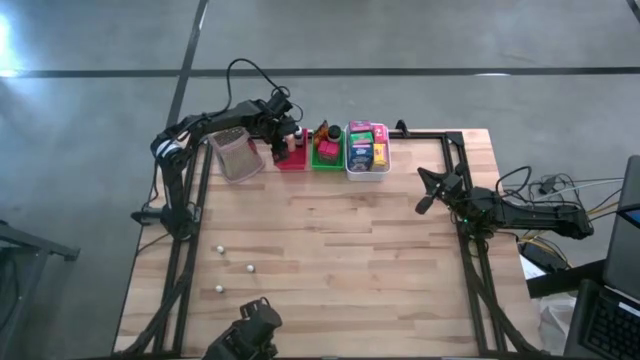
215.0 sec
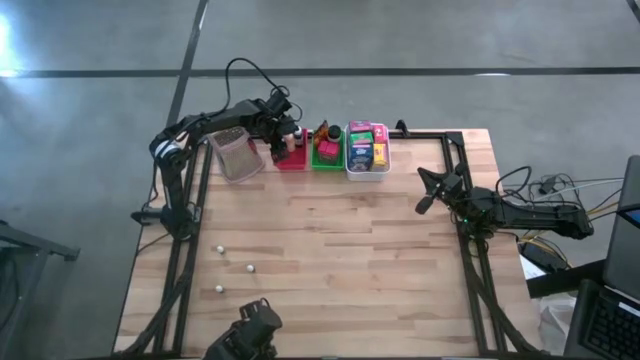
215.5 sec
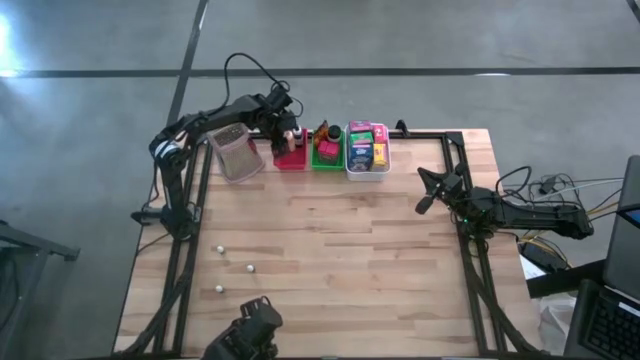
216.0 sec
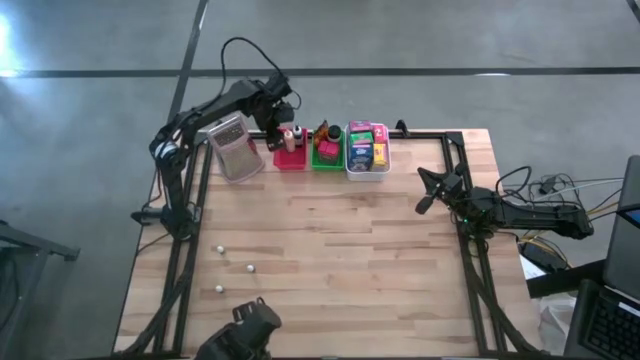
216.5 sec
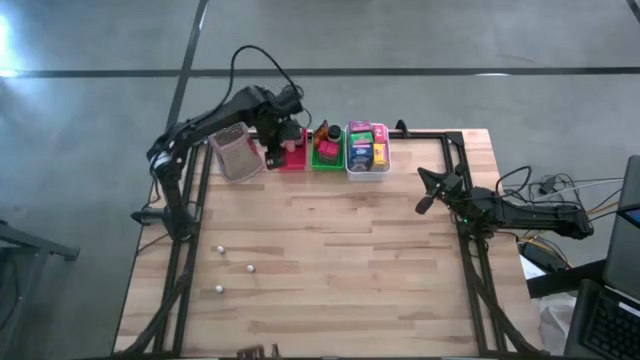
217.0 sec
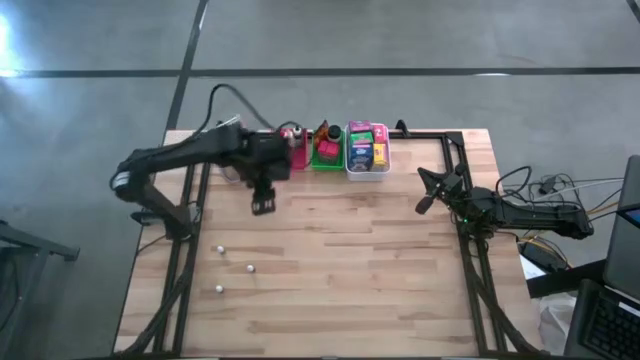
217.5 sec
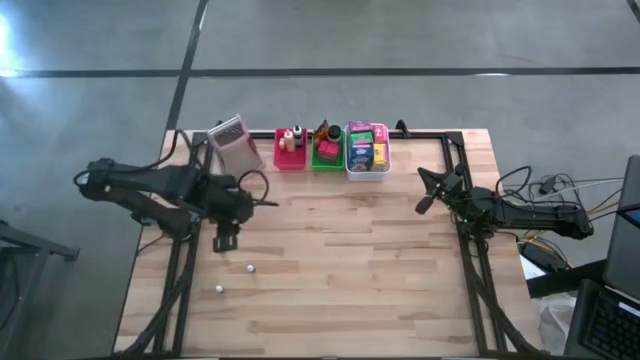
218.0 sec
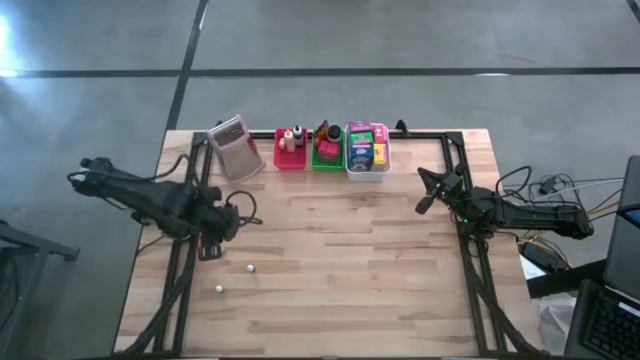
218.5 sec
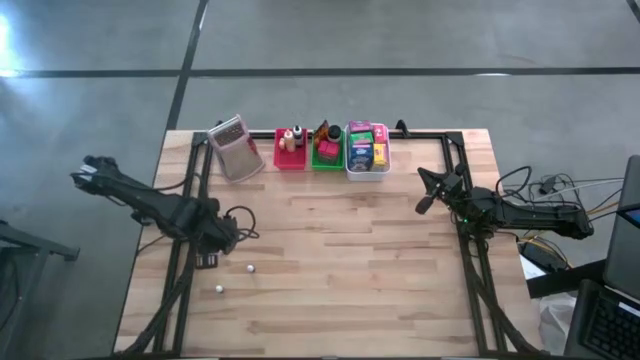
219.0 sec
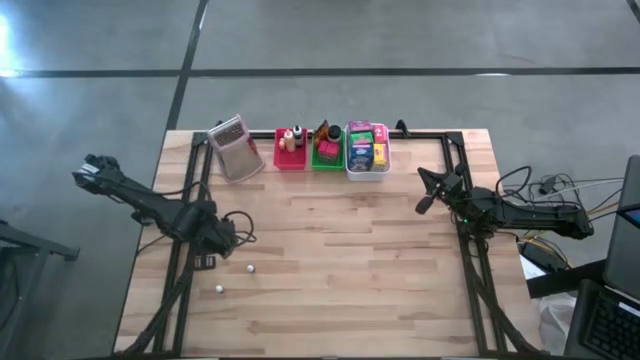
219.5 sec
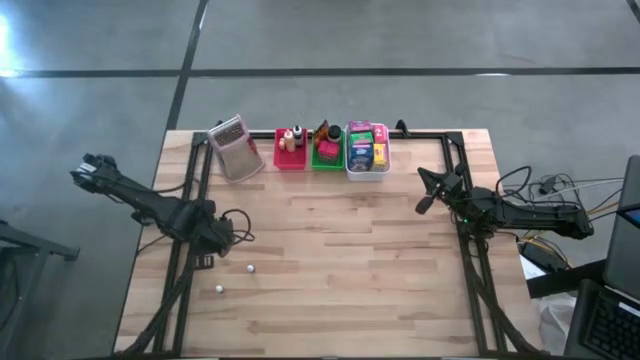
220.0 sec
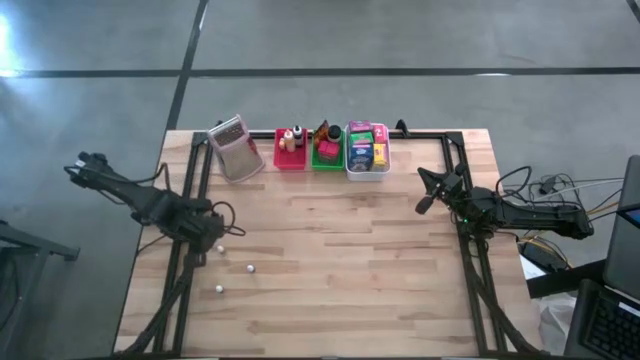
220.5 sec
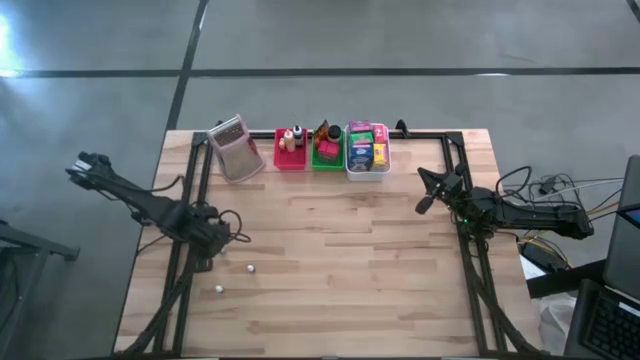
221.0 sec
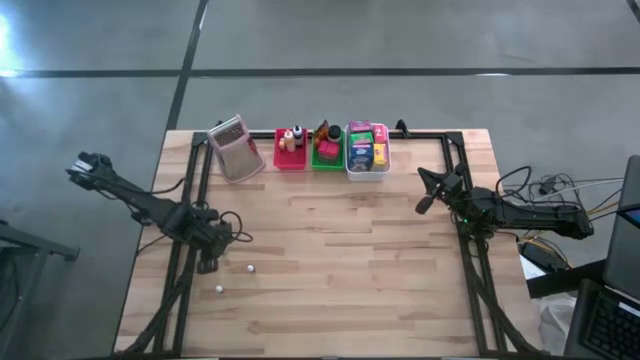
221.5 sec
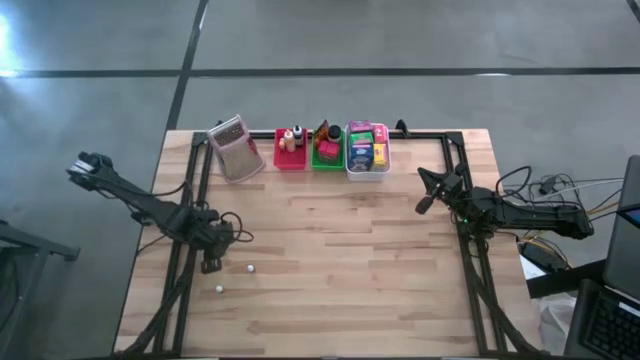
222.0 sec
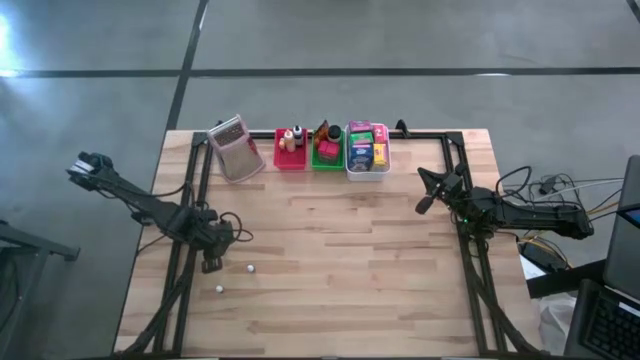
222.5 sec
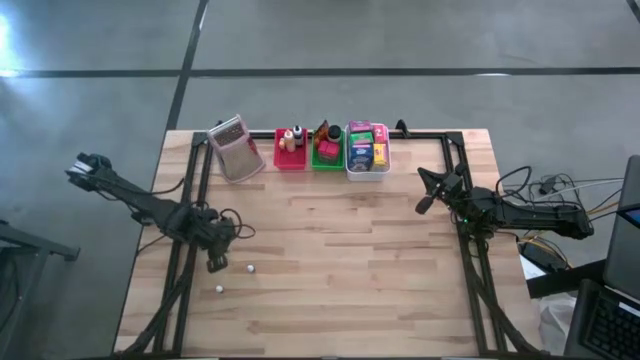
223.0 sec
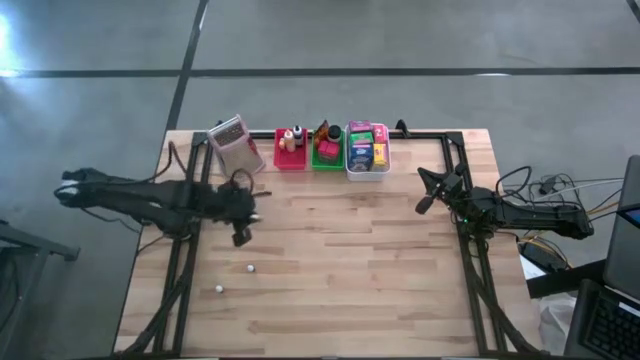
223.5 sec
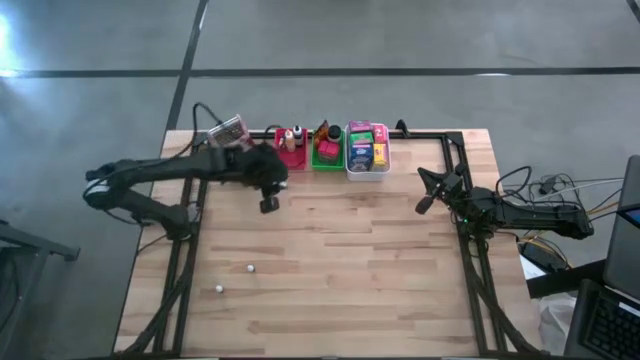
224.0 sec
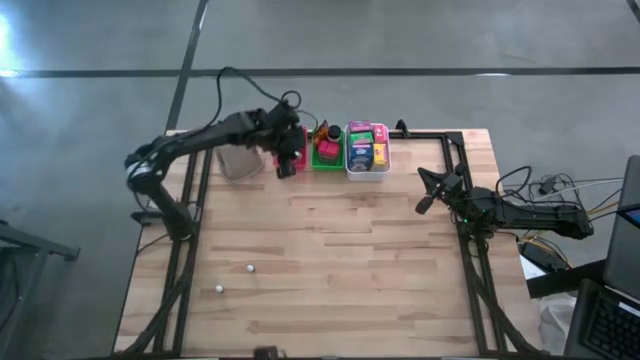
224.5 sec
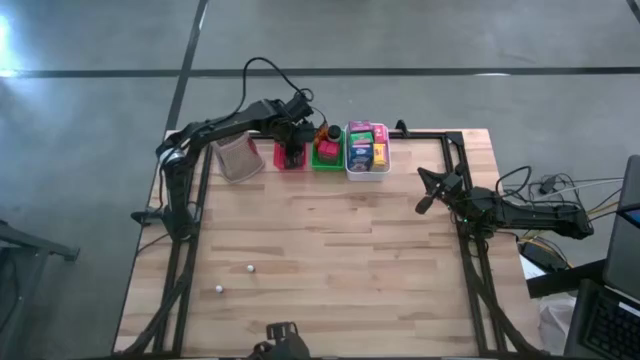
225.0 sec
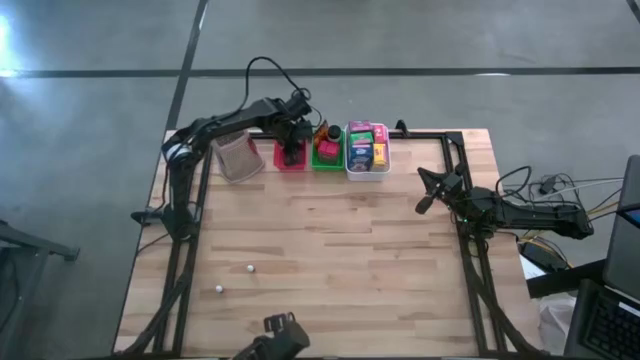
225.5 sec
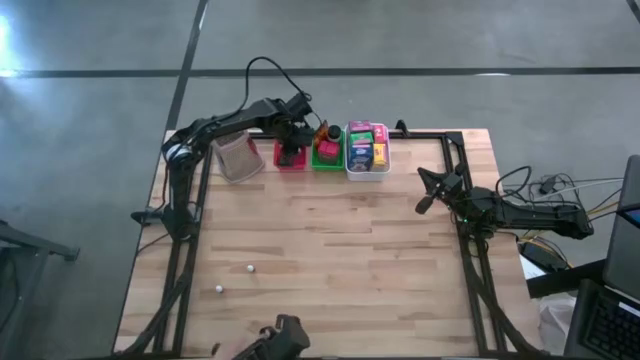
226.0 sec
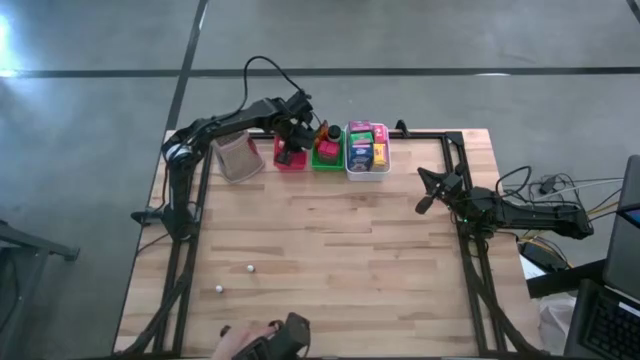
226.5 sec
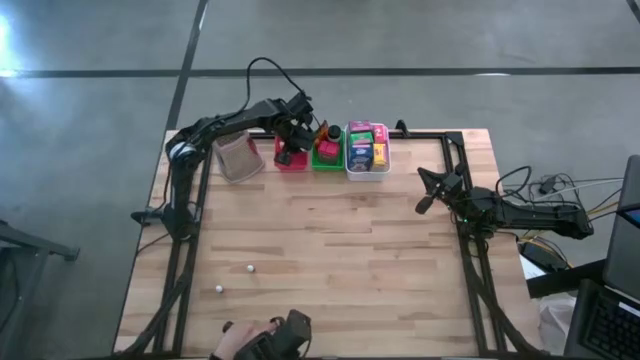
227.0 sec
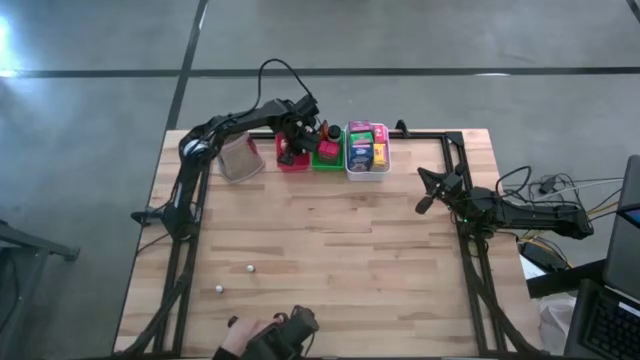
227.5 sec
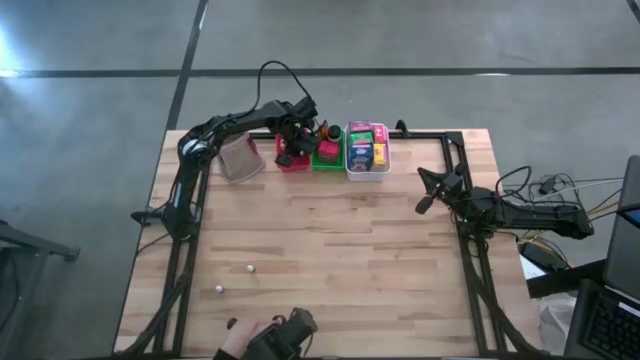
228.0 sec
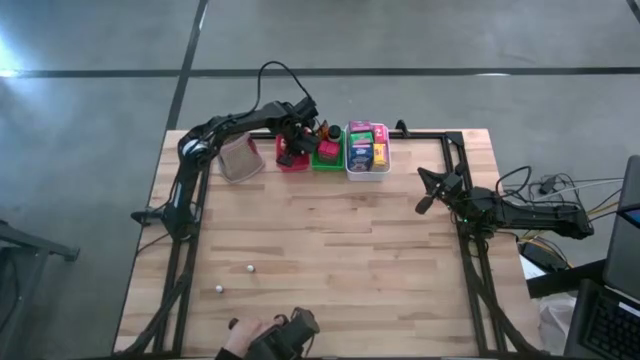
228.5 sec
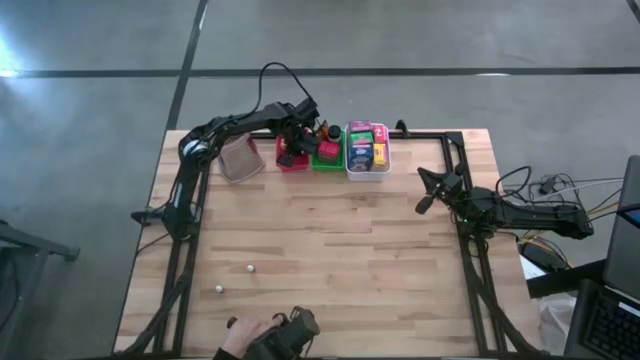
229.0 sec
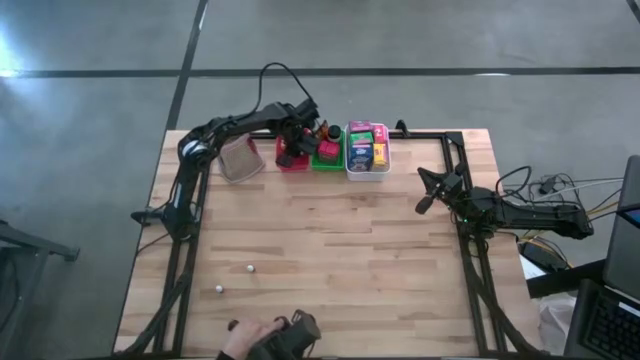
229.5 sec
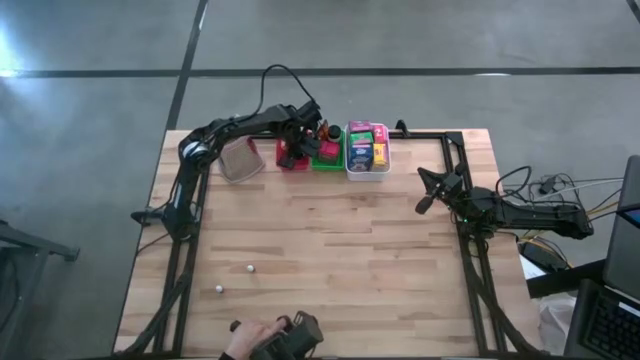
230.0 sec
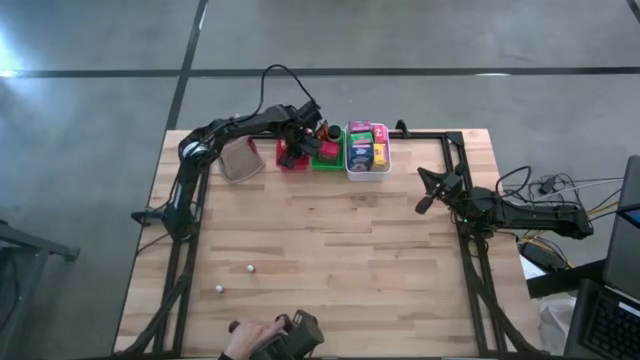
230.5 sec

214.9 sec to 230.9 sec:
Task: Pick & Place Kitchen Items
Put the small black food coloring bottle into the red bin

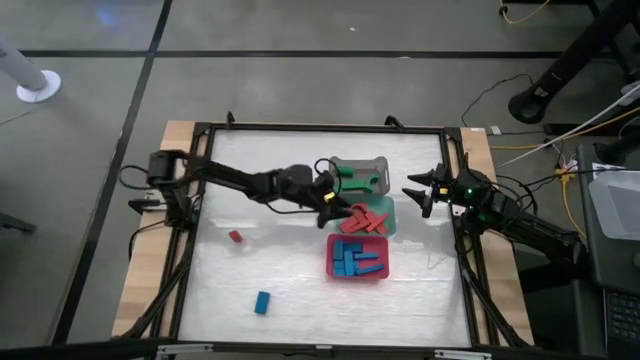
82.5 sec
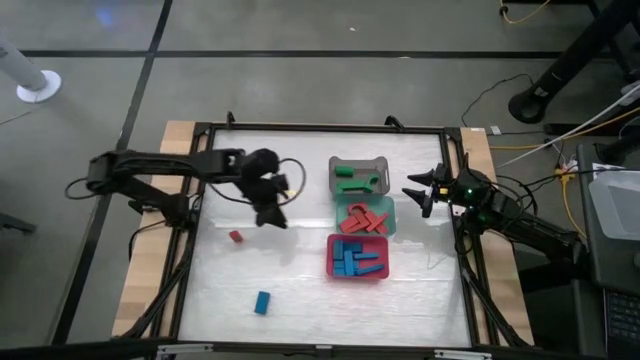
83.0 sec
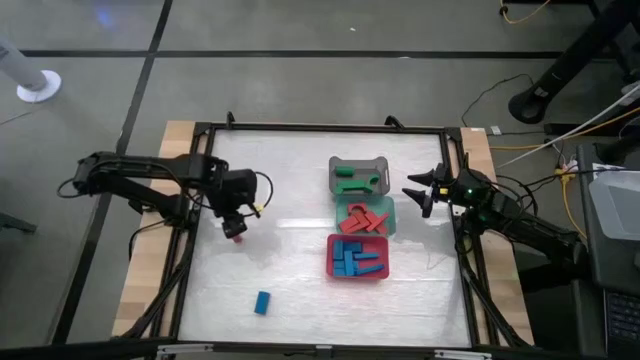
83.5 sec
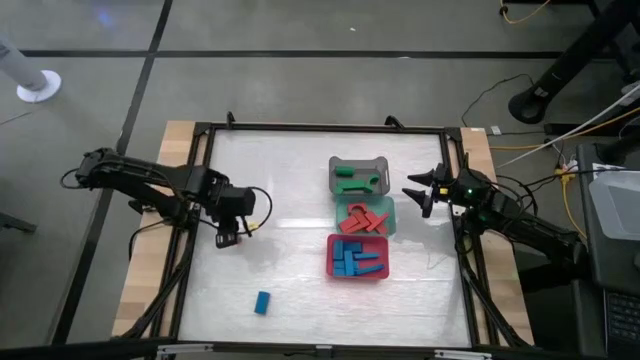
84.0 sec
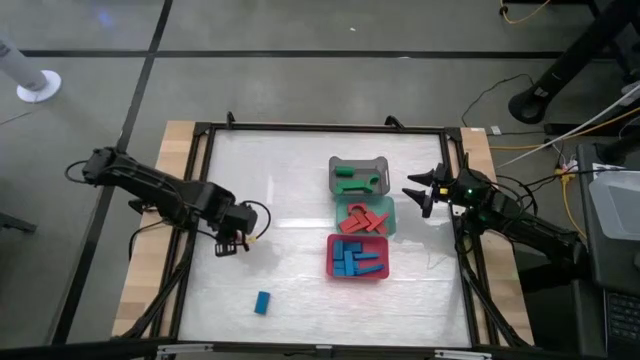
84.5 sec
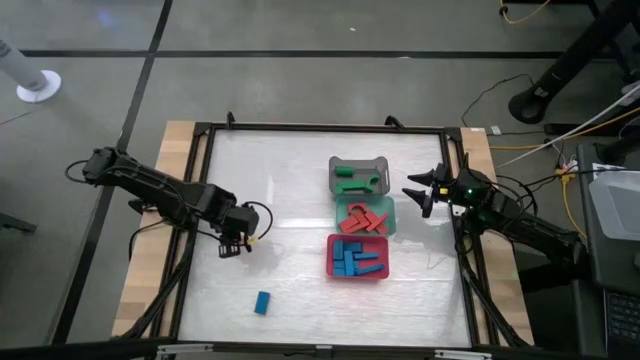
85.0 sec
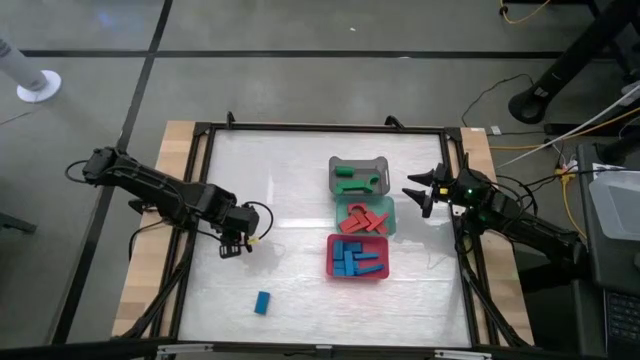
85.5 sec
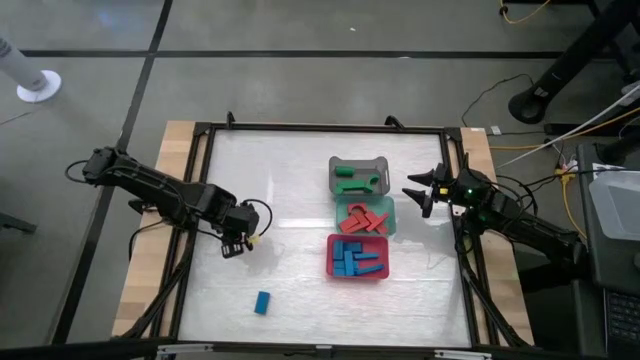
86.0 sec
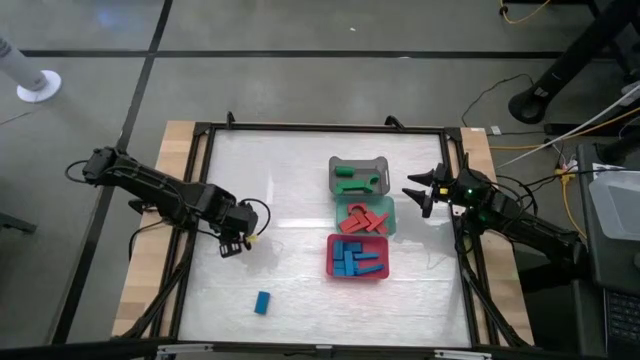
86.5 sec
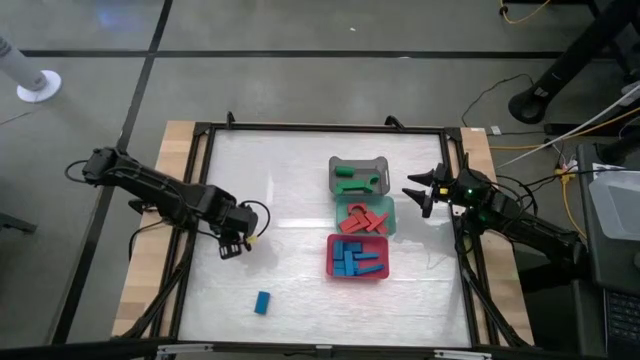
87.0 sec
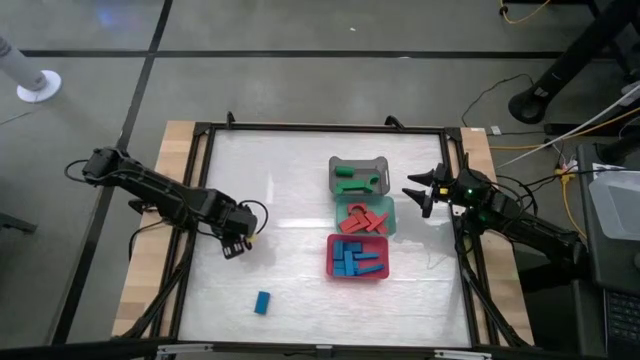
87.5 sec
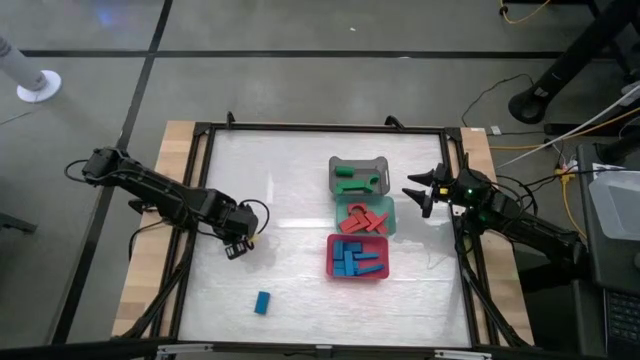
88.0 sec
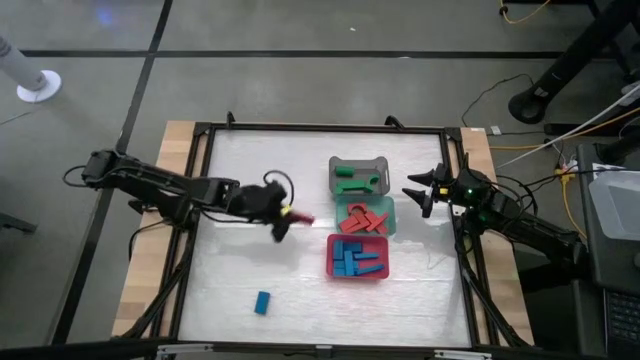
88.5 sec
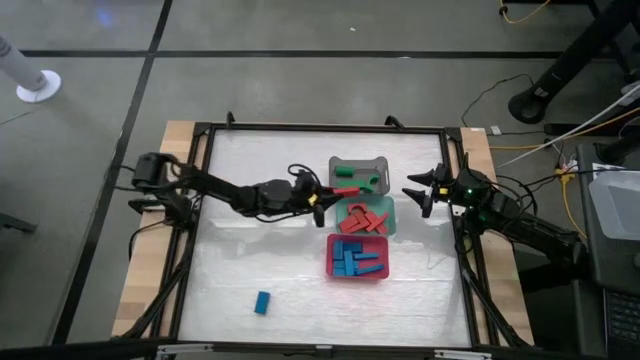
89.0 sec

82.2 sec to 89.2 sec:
Task: Sort blocks
Put the red block into the green bin
